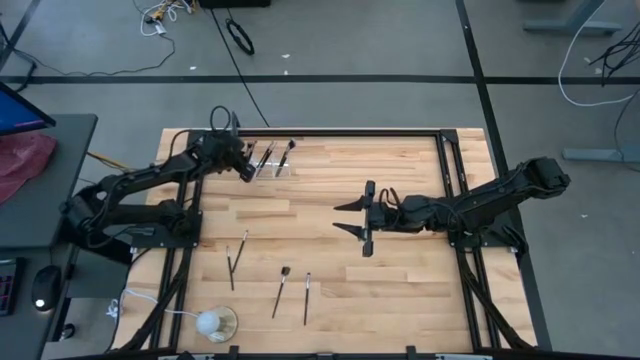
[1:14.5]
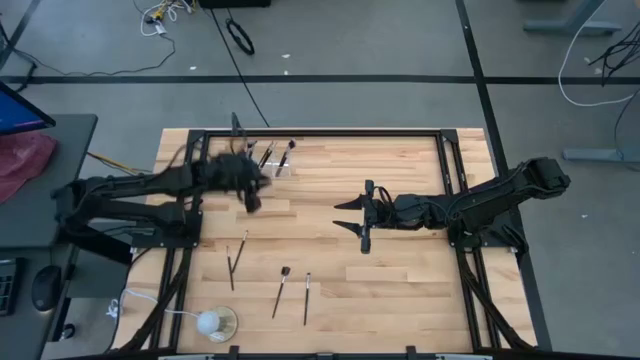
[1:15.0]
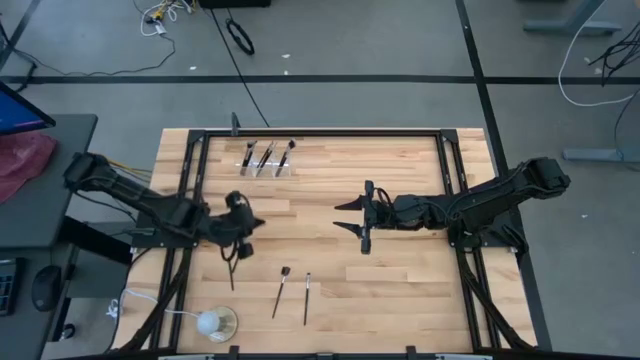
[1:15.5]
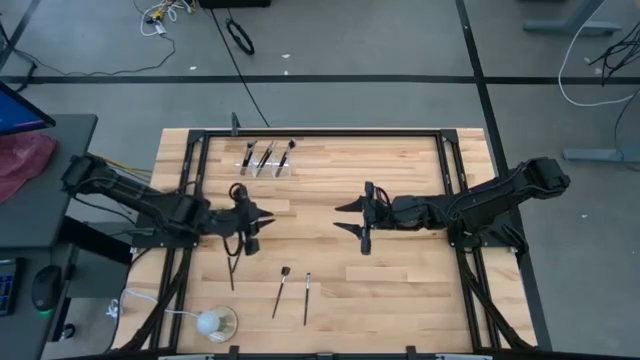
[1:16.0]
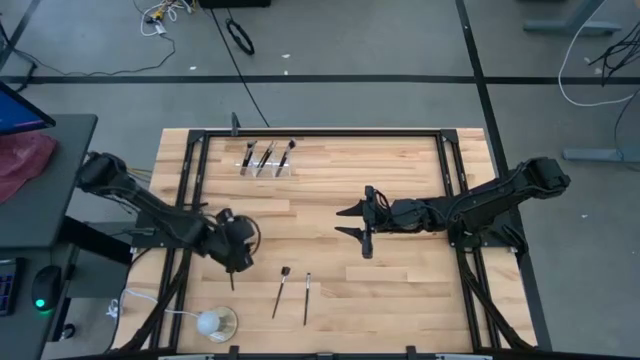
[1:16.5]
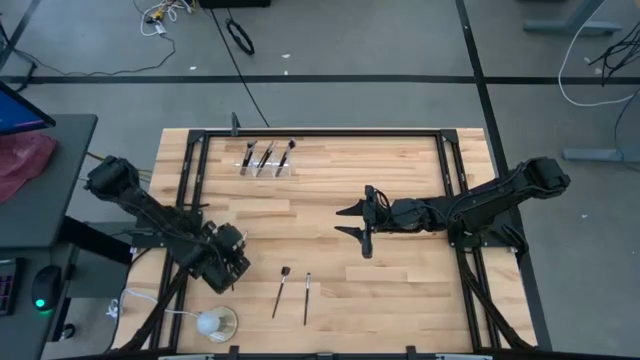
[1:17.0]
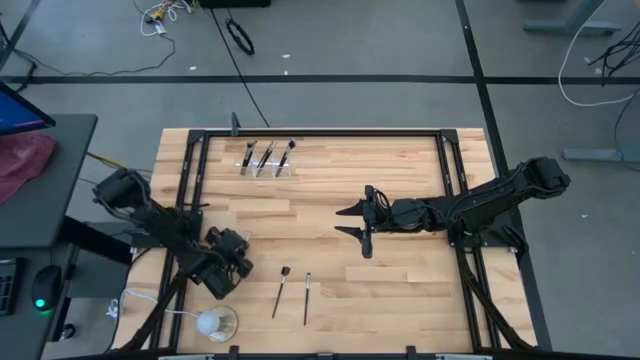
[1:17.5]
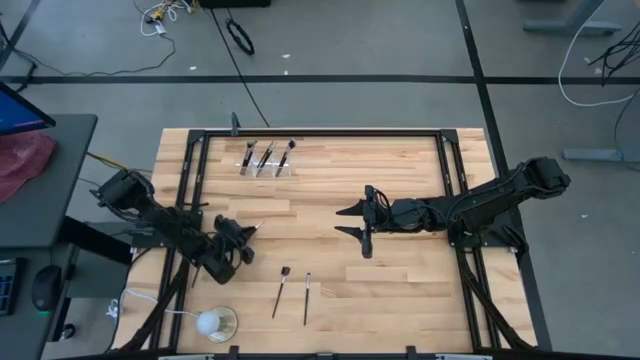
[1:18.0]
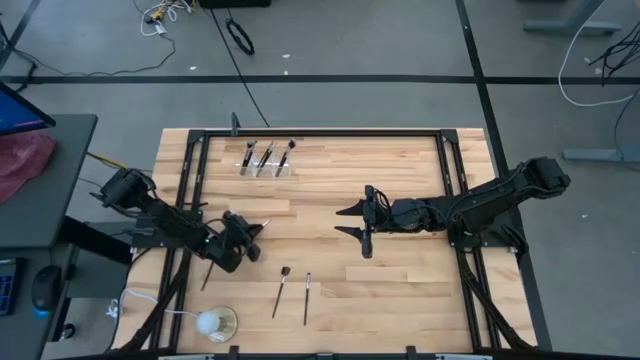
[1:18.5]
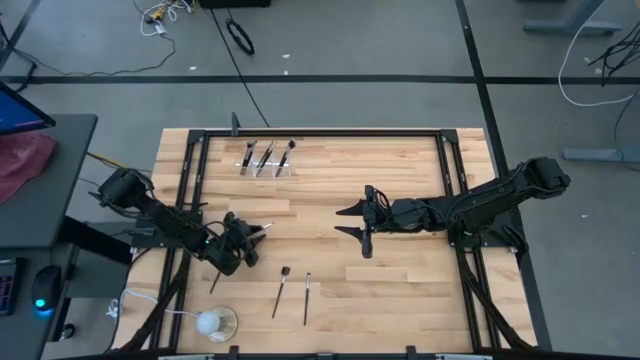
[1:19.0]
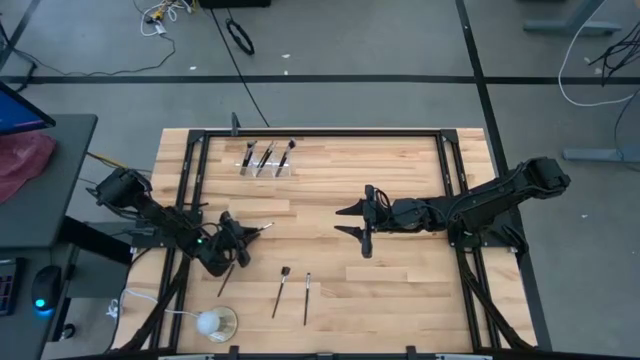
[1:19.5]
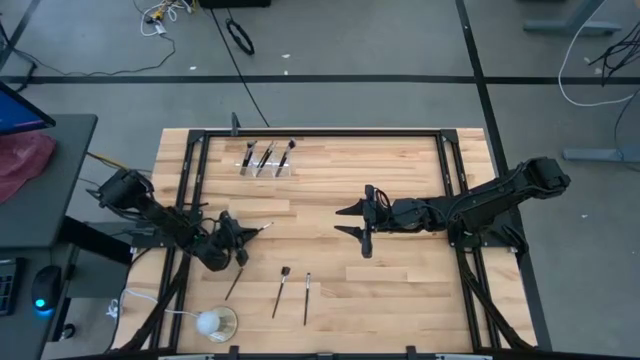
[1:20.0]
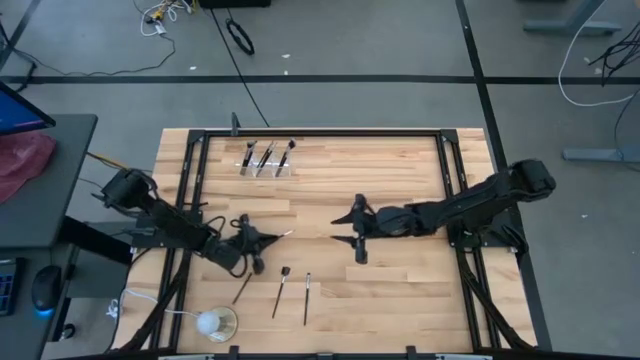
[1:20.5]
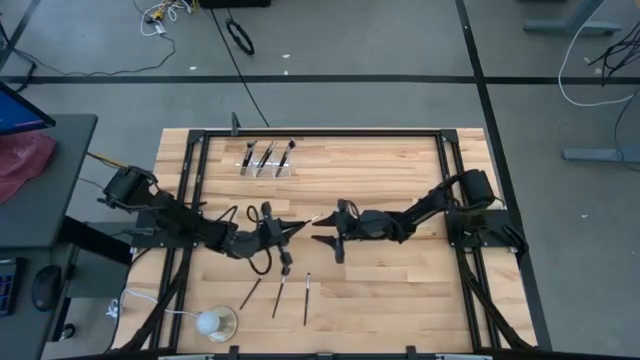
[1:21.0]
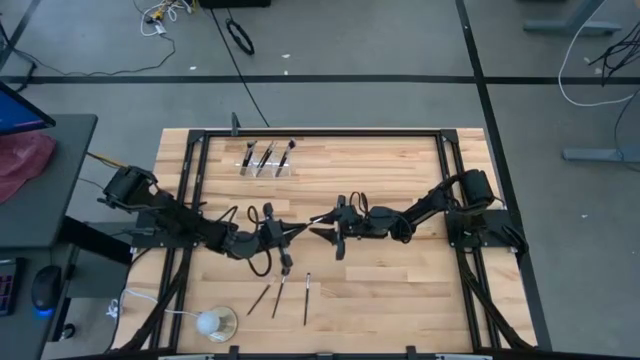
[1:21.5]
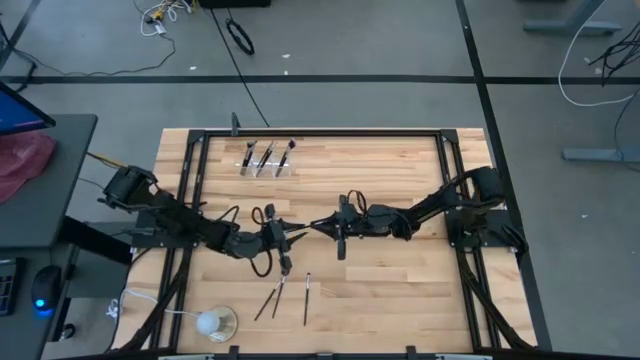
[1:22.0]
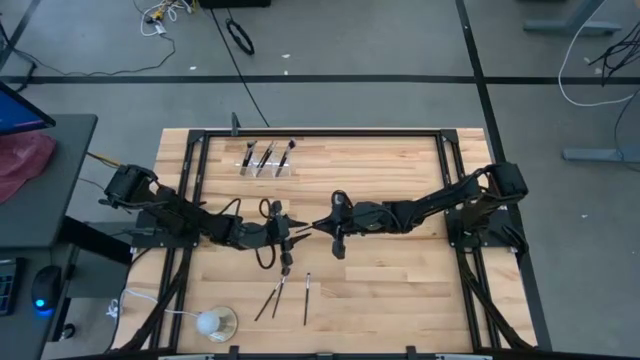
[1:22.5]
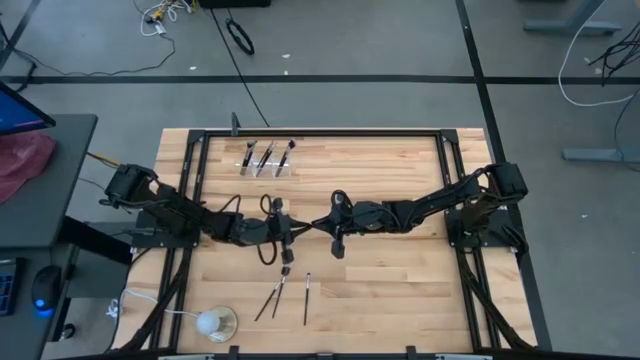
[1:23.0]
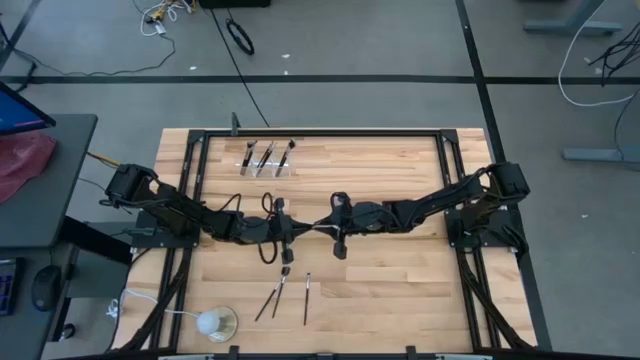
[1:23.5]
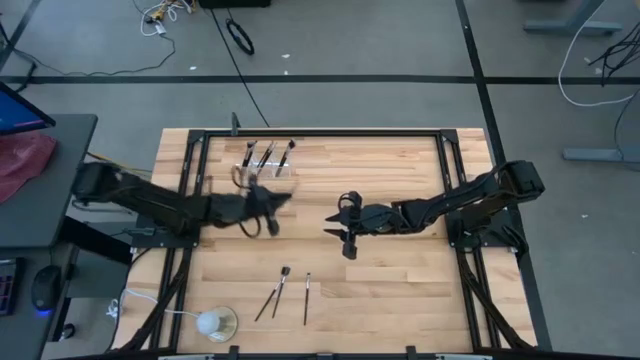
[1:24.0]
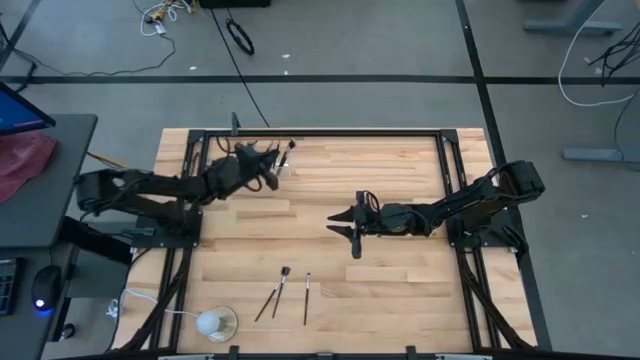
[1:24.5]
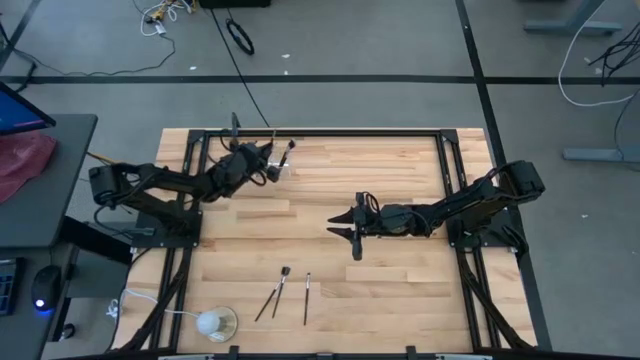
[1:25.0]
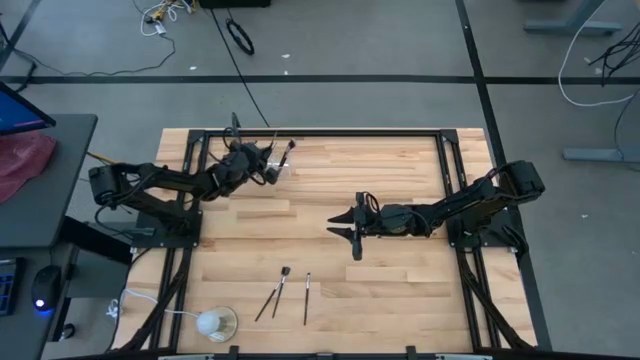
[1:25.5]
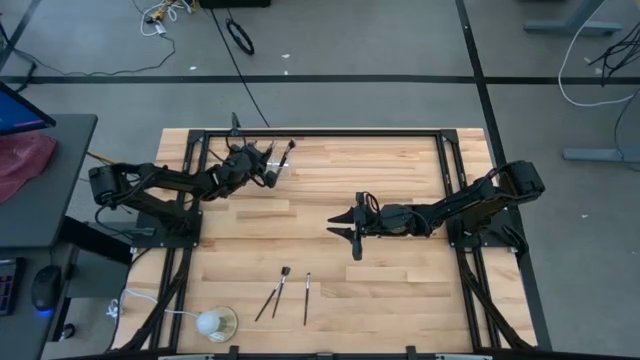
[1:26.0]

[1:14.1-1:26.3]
Task: Put items in baskets/containers
Put the eyeshadow brush into the right section of the transparent organizer

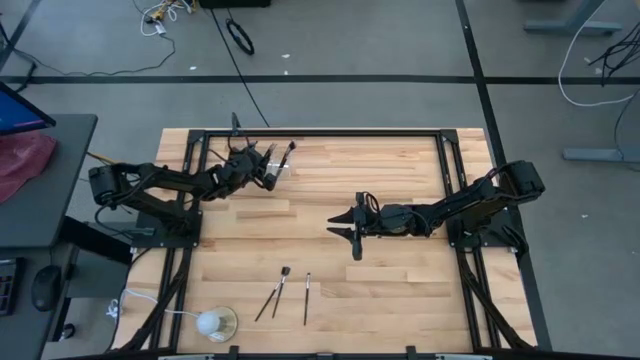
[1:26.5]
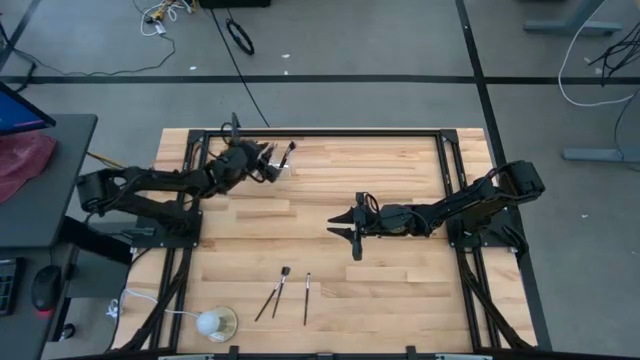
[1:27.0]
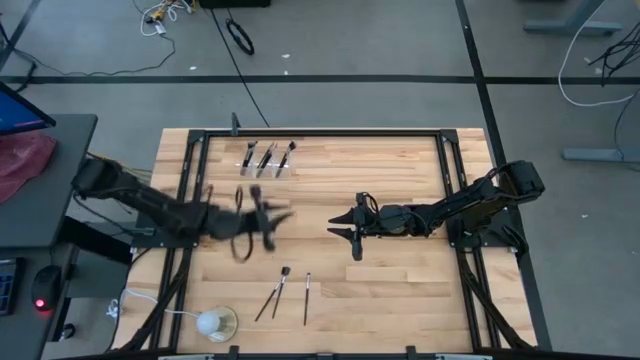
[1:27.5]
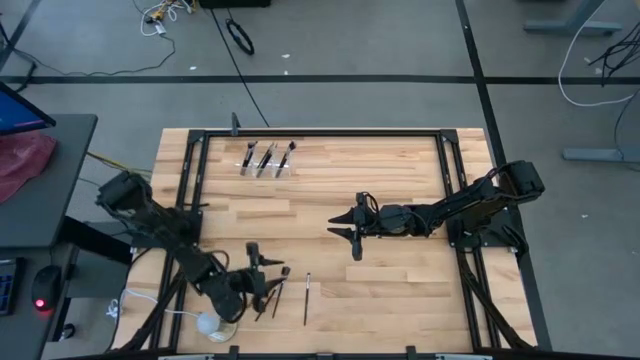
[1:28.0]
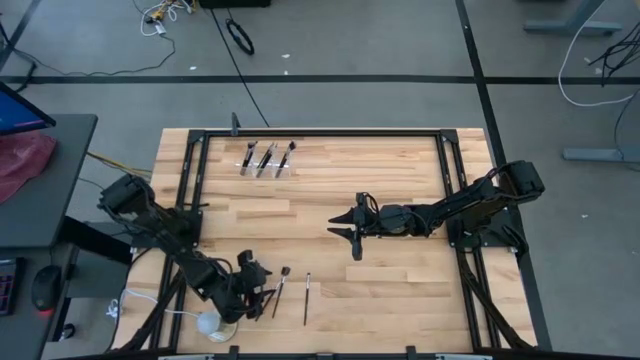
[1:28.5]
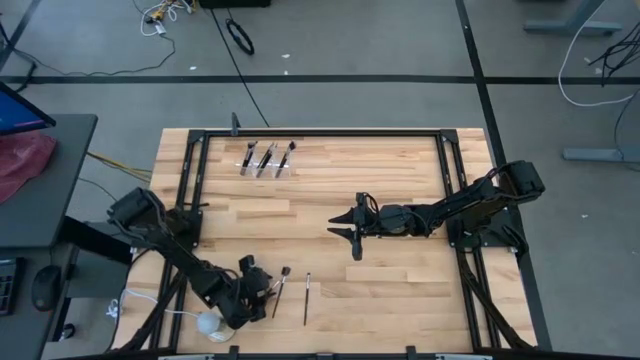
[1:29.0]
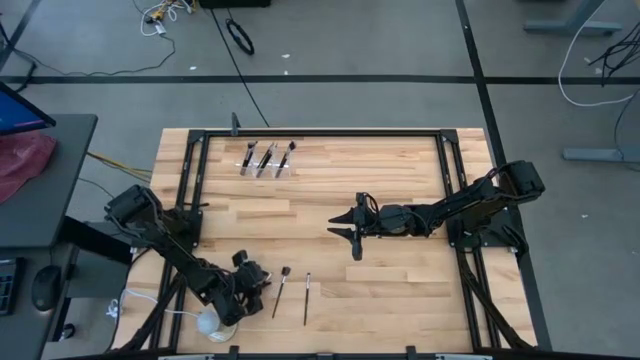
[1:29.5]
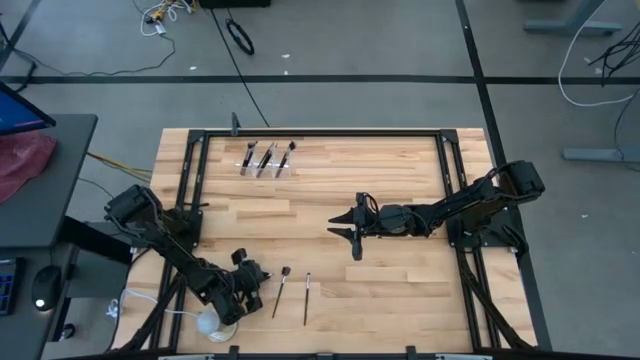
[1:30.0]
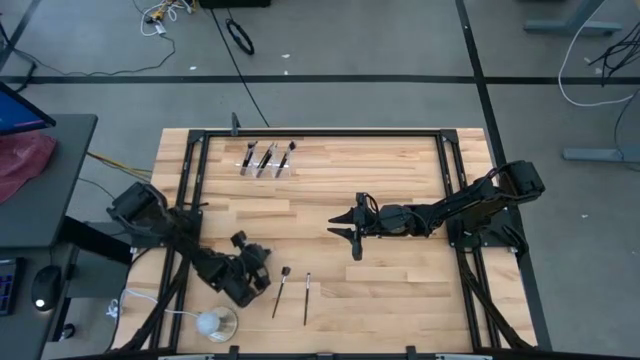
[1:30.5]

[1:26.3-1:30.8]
Put the eyeshadow brush into the left section of the transparent organizer

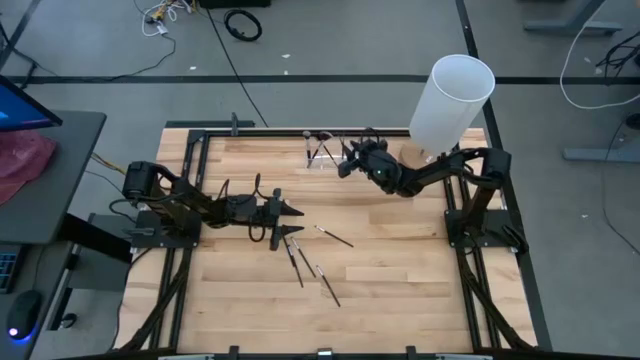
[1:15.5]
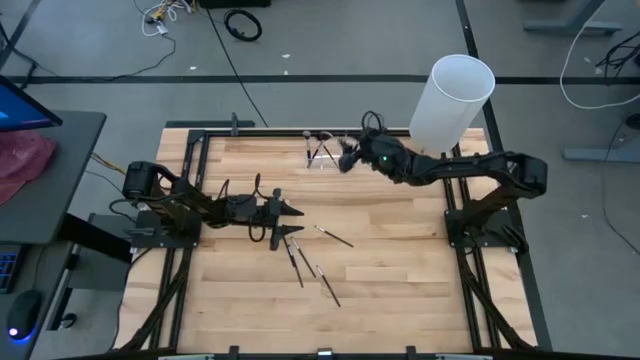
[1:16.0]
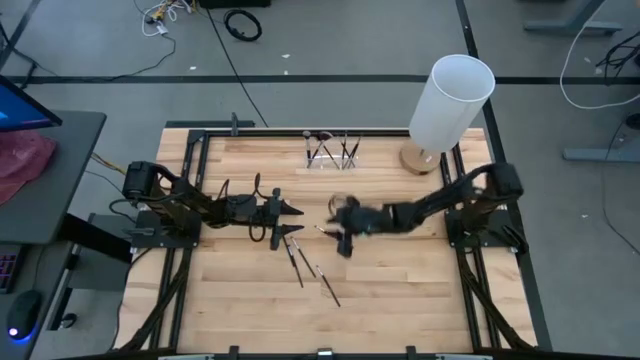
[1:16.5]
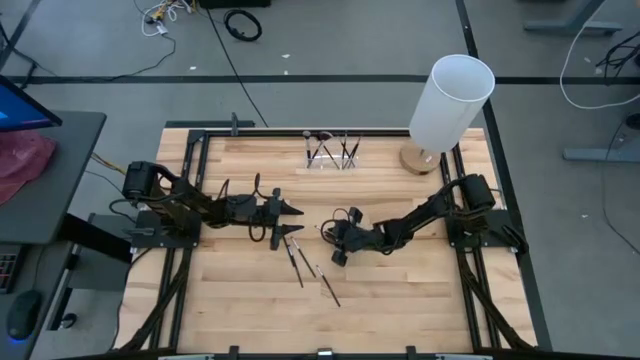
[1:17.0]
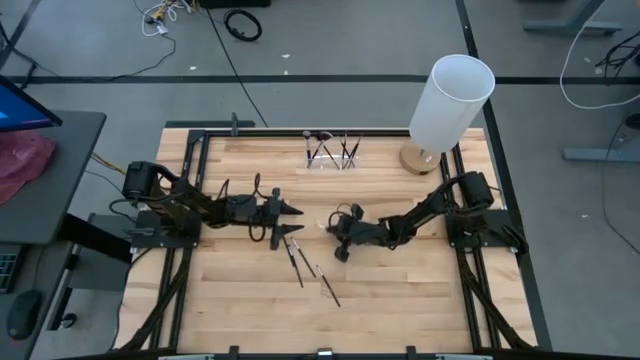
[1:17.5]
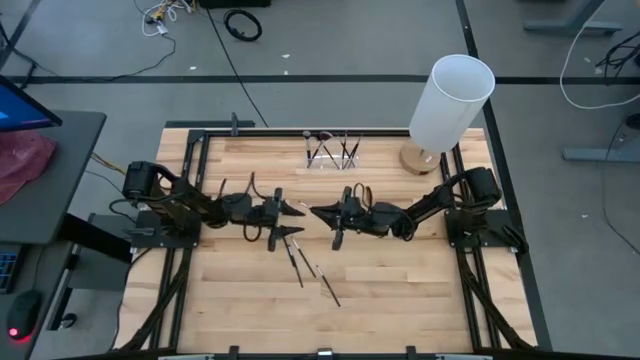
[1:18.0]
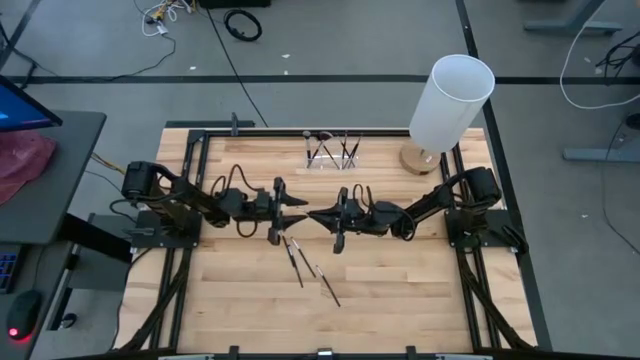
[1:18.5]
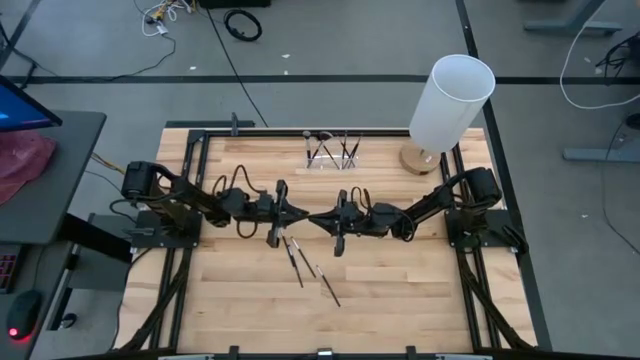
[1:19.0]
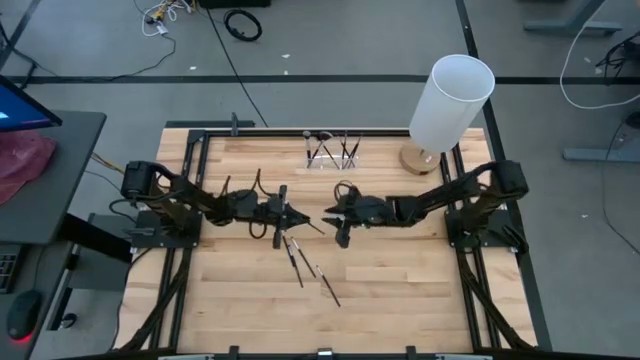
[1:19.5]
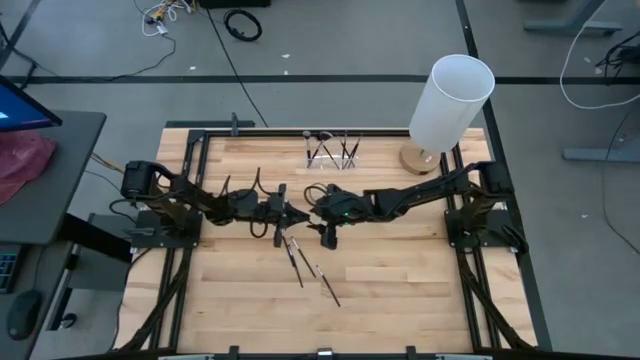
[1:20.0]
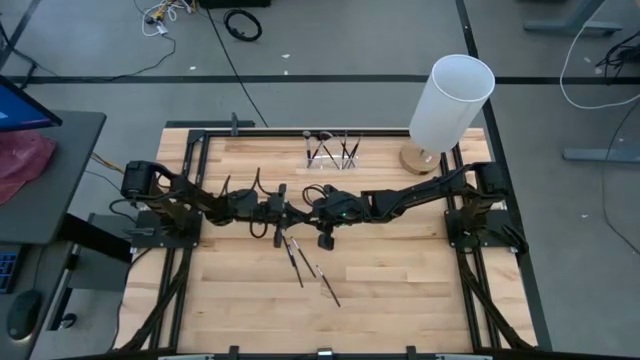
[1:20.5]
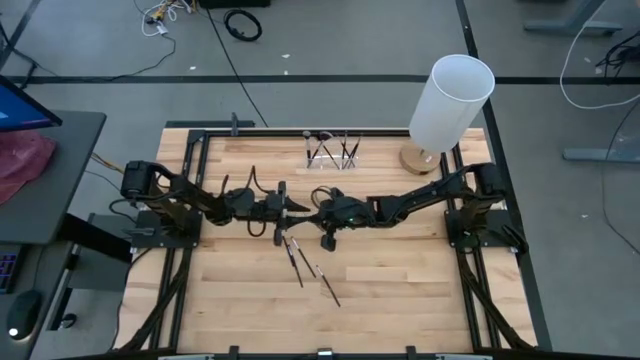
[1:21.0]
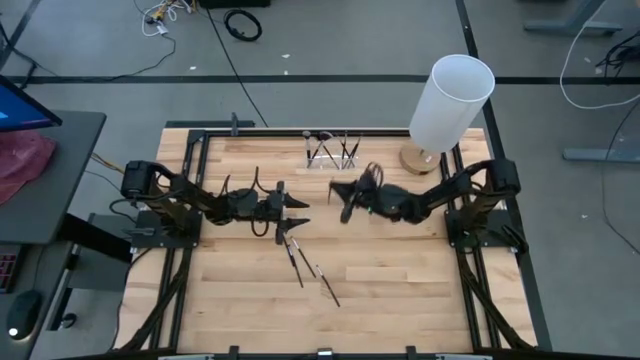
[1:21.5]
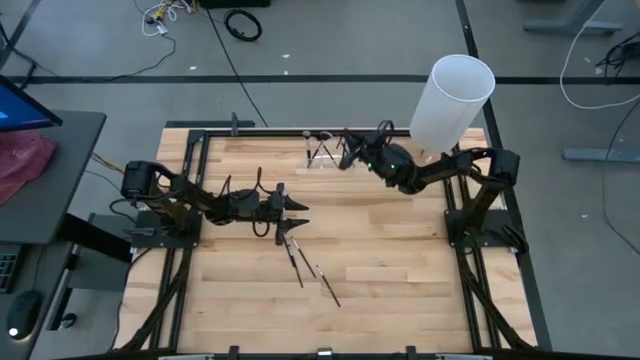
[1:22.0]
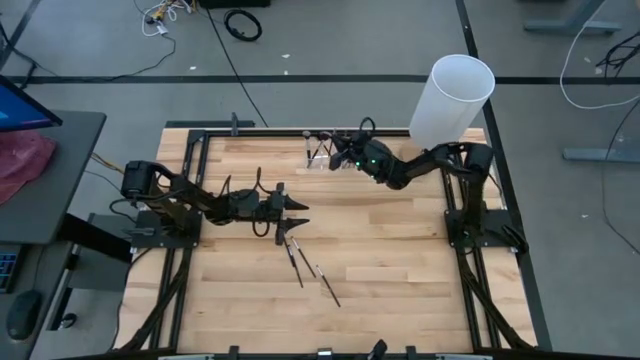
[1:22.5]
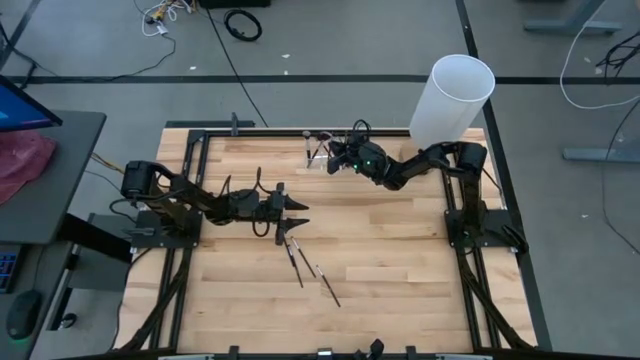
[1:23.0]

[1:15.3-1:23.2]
Task: Pick & Place Makeup Supplies
Put the black makeup brush into the transparent organizer
